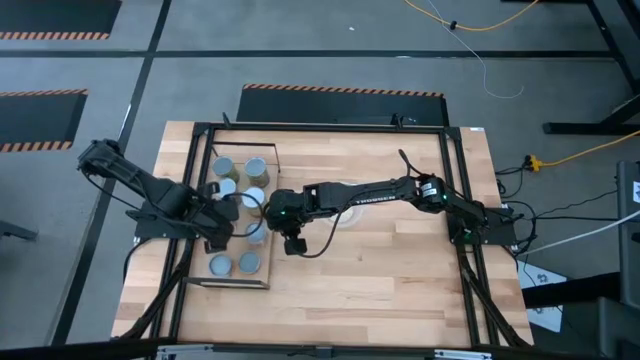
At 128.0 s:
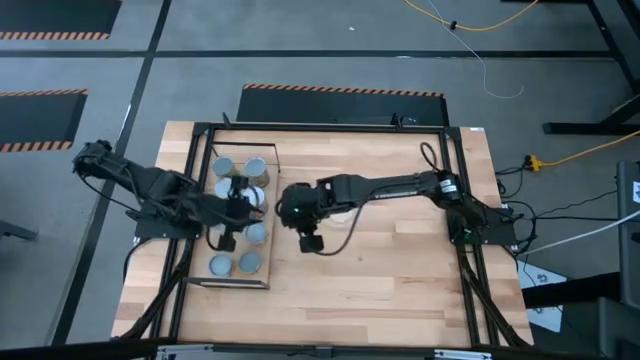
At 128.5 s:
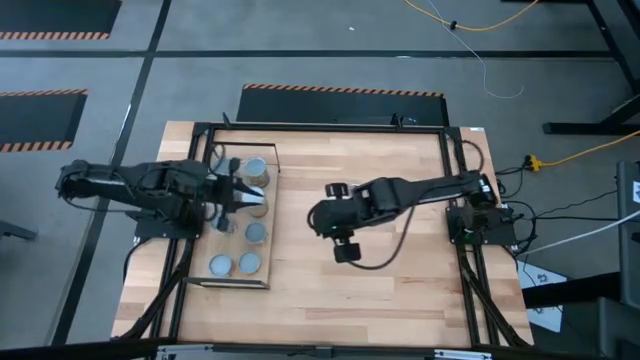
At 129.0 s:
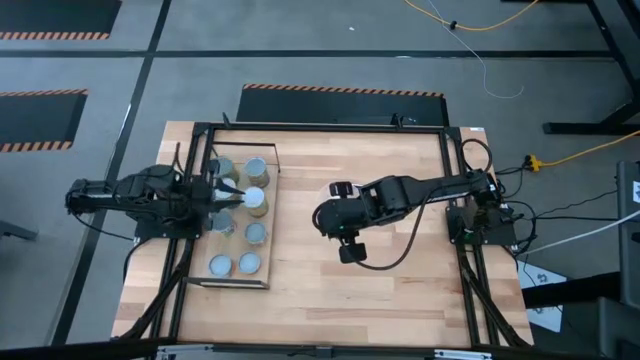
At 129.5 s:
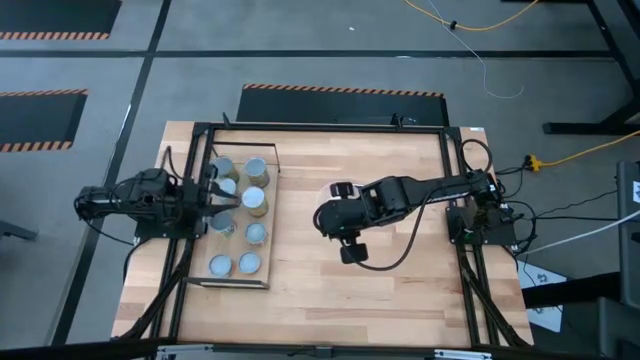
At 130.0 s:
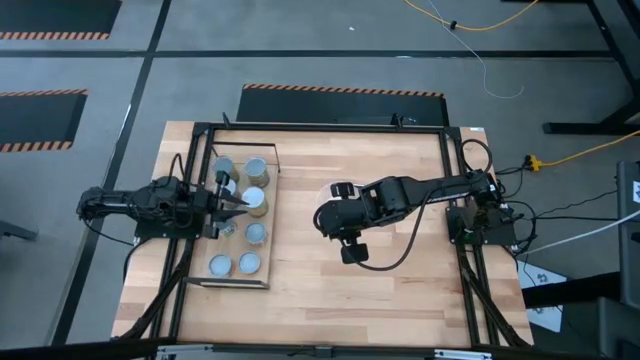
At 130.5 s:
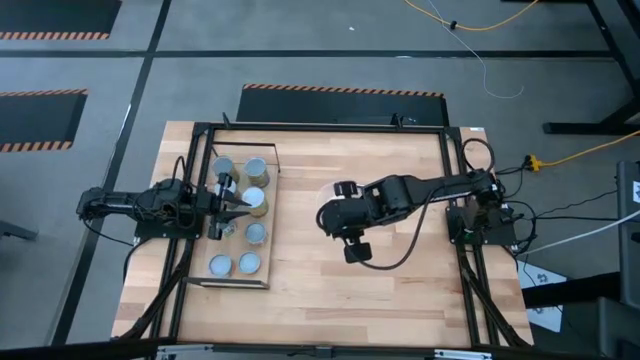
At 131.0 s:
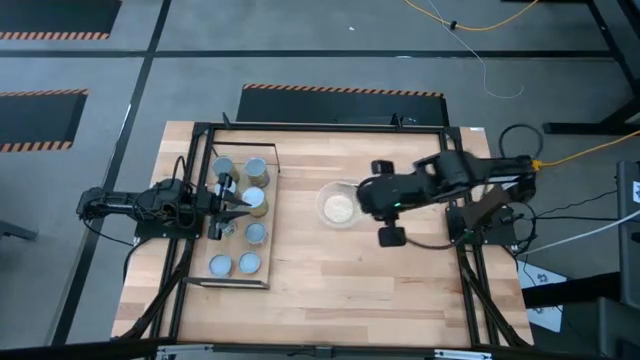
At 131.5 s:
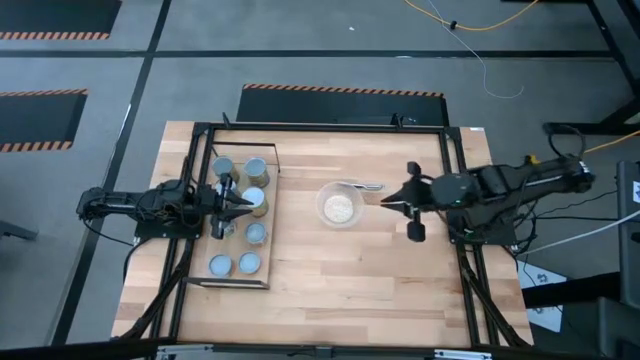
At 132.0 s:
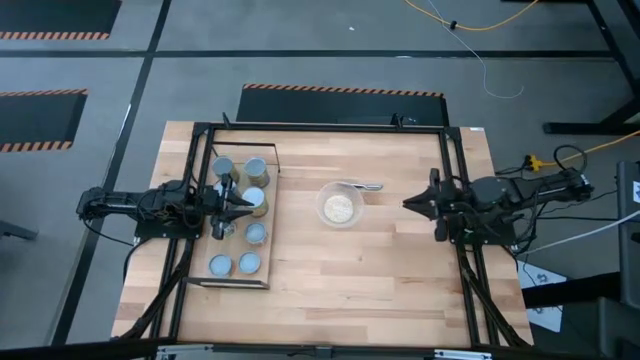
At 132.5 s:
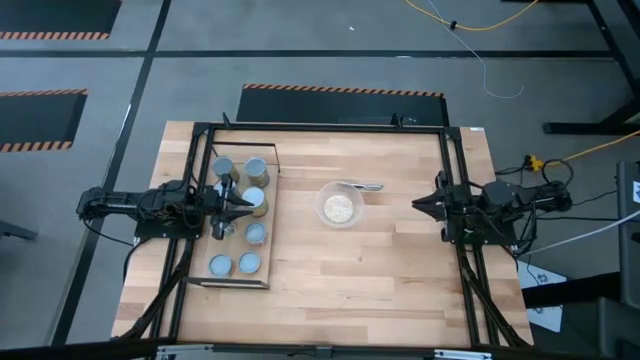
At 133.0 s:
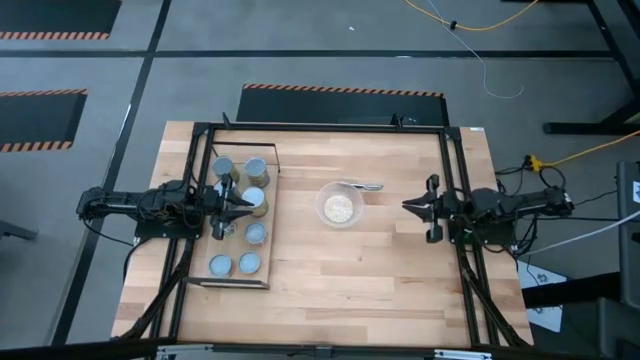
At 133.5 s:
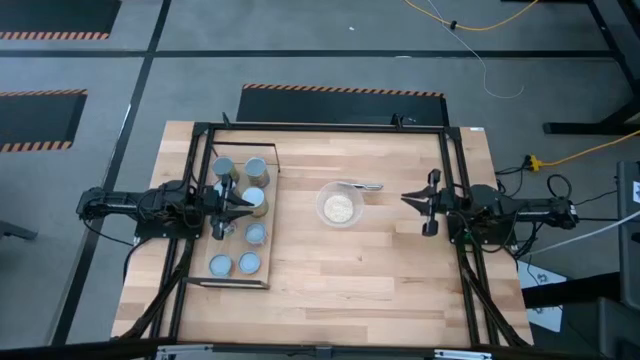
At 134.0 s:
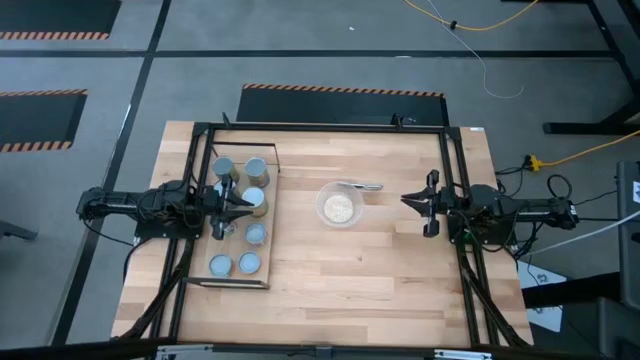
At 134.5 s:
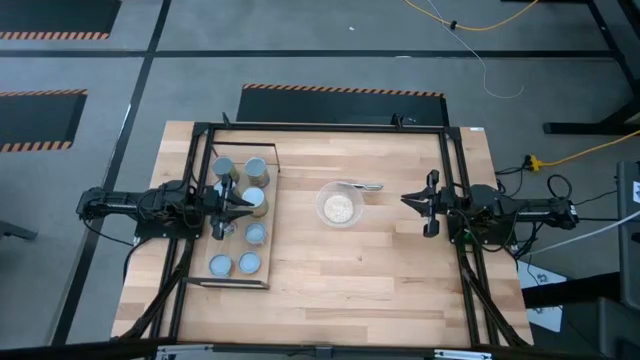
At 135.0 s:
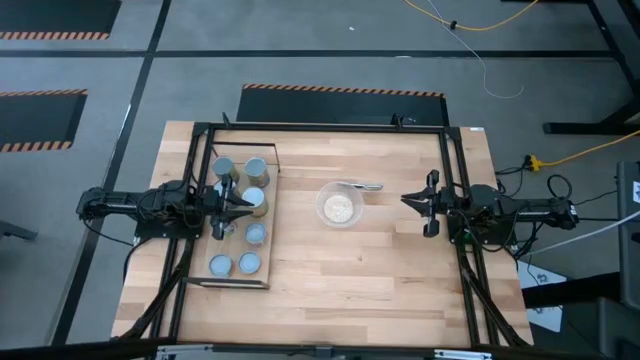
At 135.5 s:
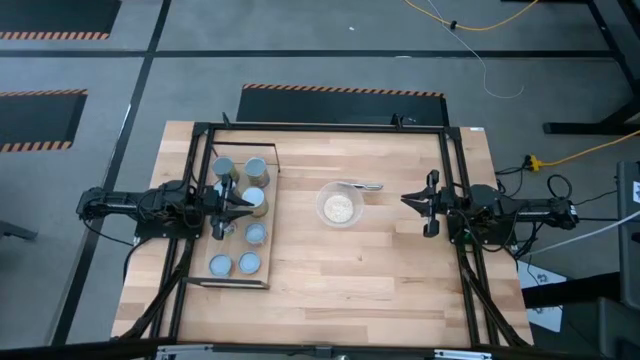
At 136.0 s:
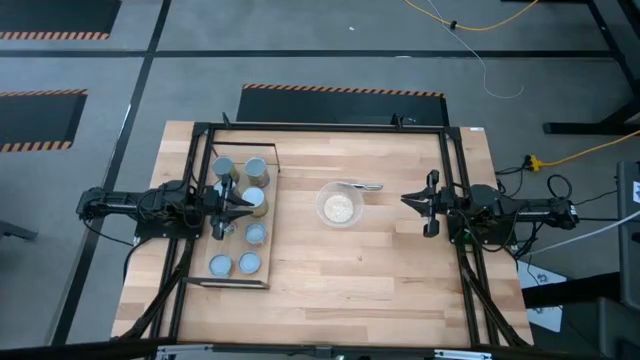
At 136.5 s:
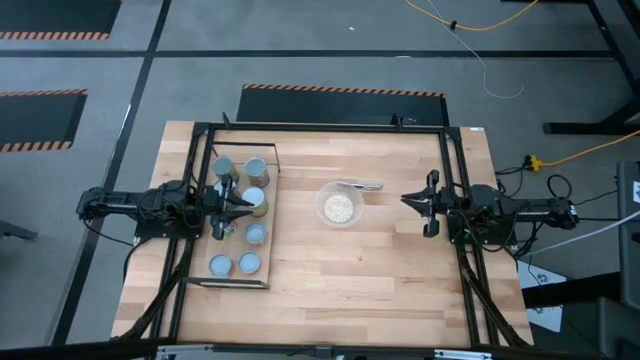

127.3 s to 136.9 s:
Task: Pick and place cans onto a shelf
Return to Home Position

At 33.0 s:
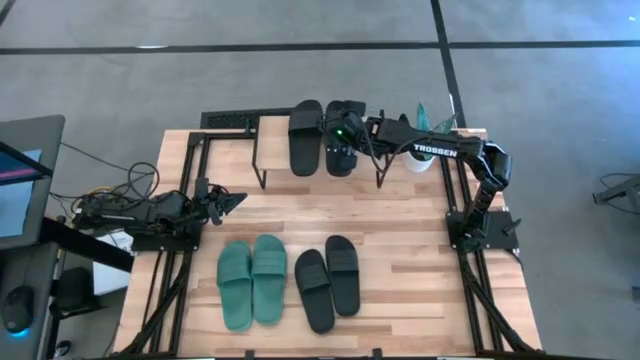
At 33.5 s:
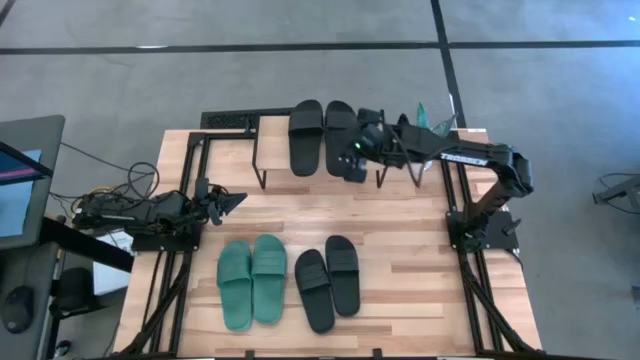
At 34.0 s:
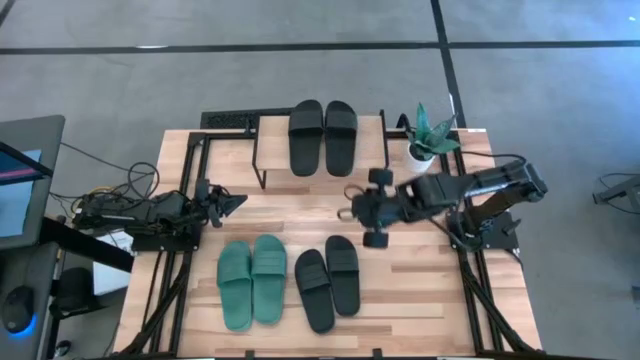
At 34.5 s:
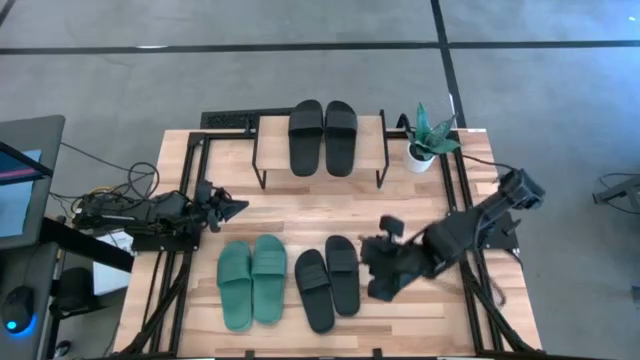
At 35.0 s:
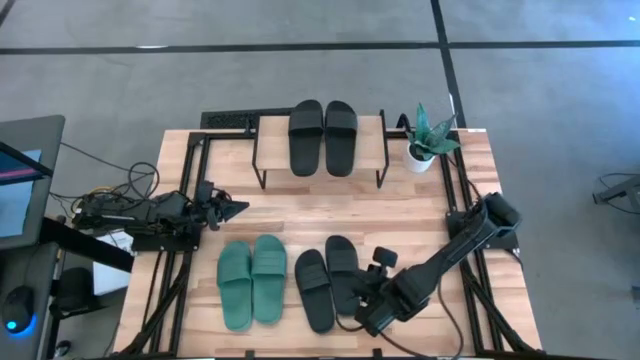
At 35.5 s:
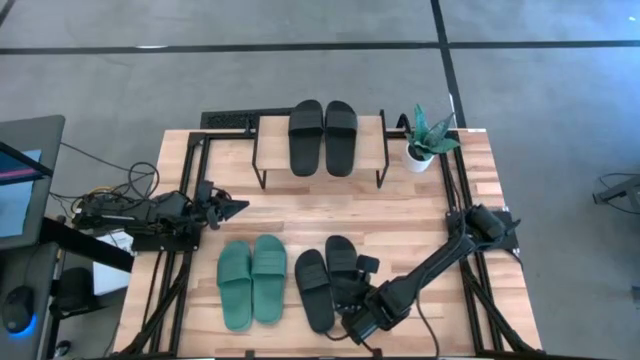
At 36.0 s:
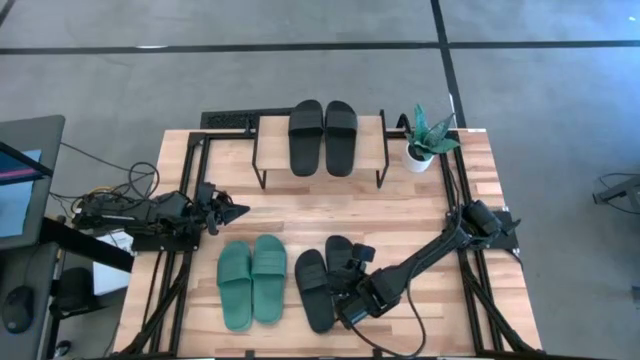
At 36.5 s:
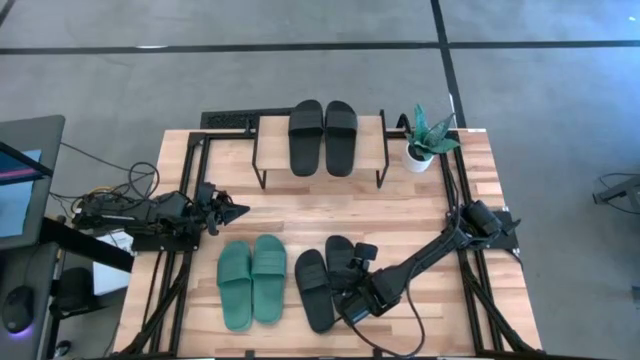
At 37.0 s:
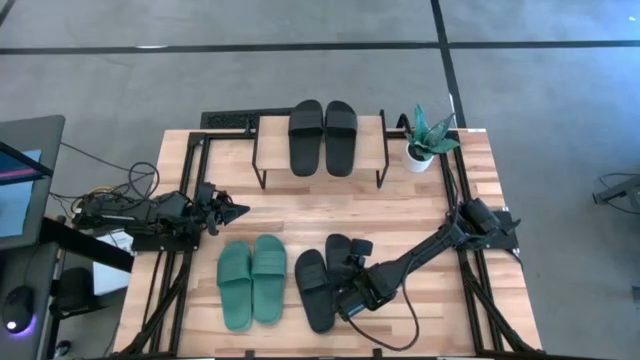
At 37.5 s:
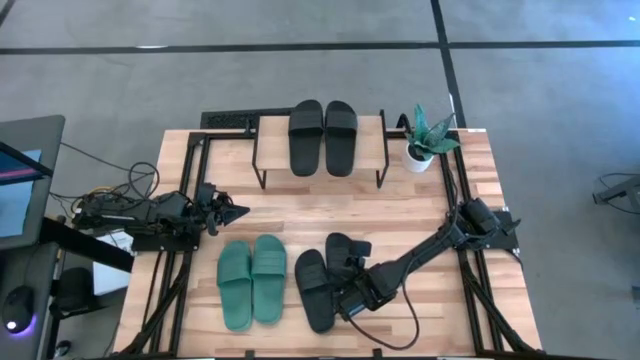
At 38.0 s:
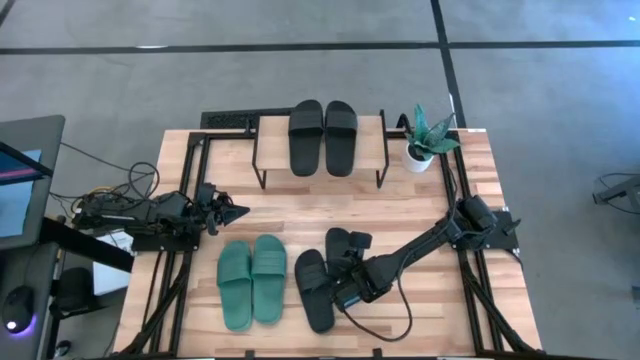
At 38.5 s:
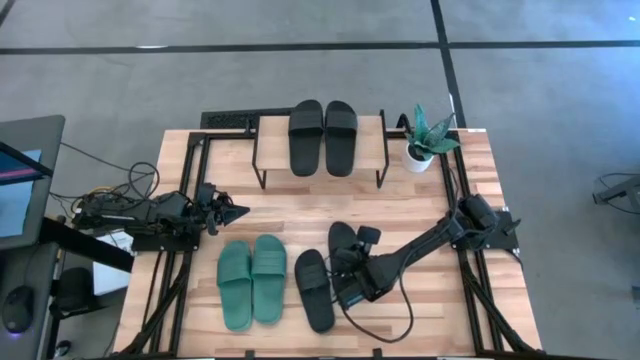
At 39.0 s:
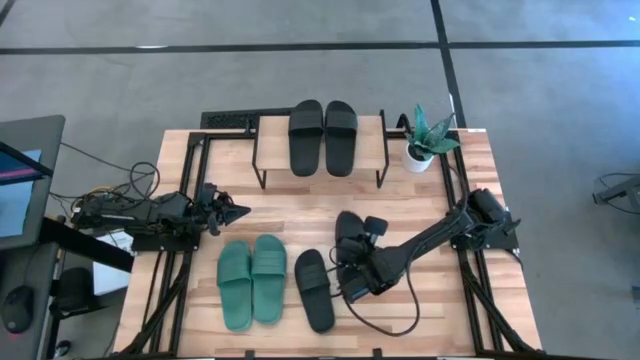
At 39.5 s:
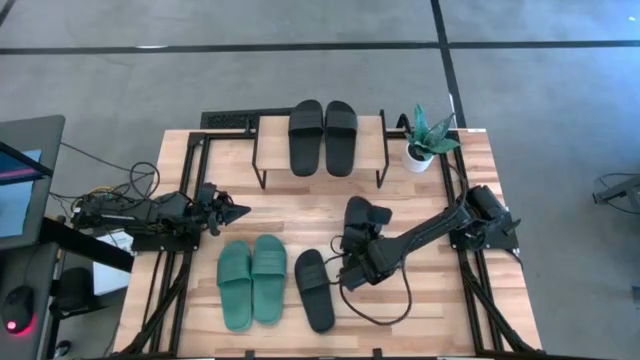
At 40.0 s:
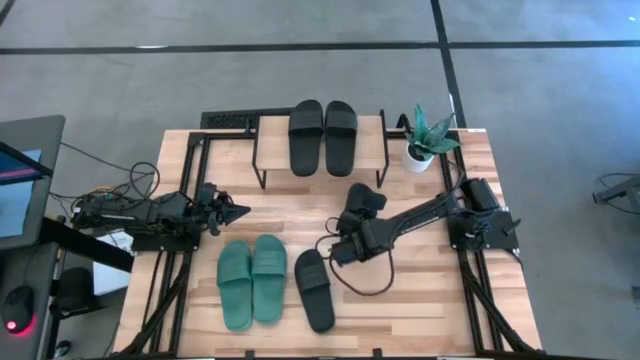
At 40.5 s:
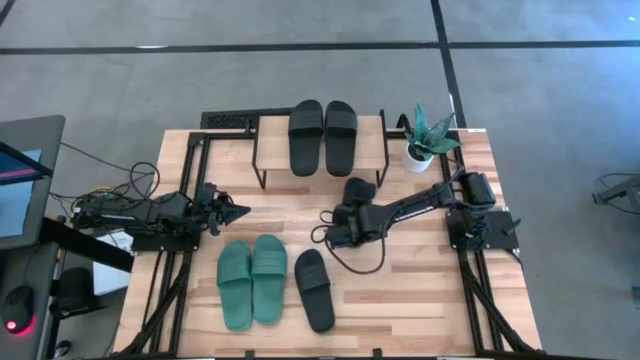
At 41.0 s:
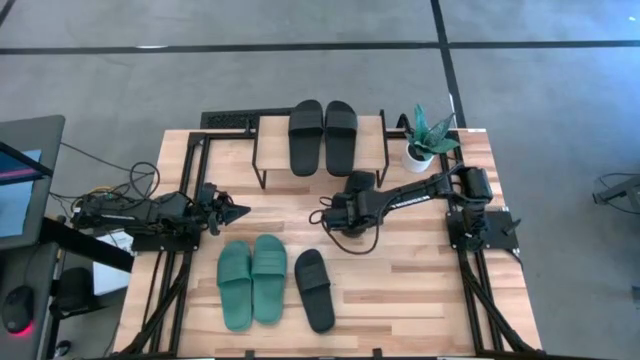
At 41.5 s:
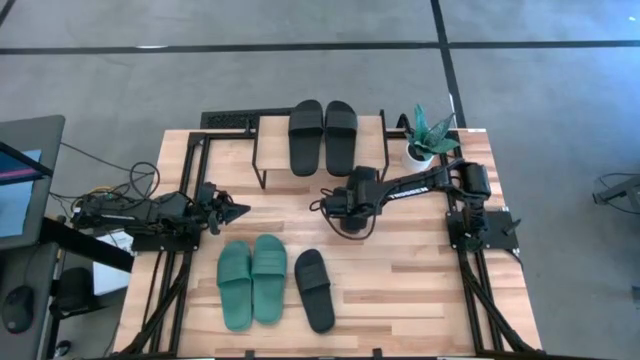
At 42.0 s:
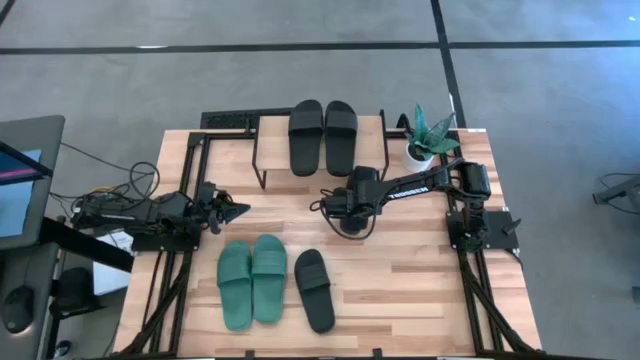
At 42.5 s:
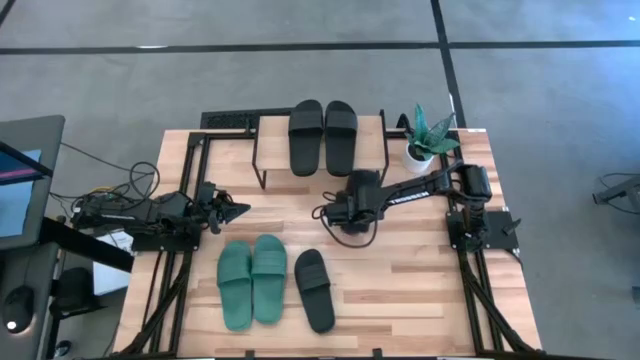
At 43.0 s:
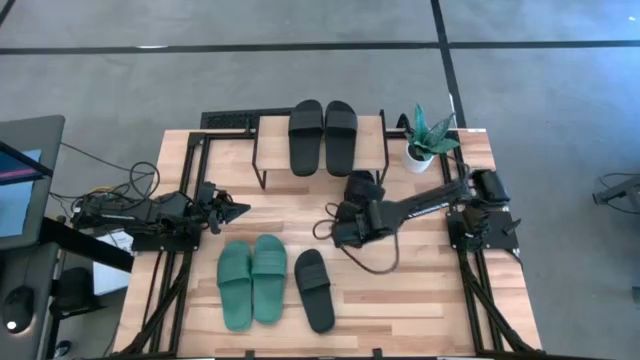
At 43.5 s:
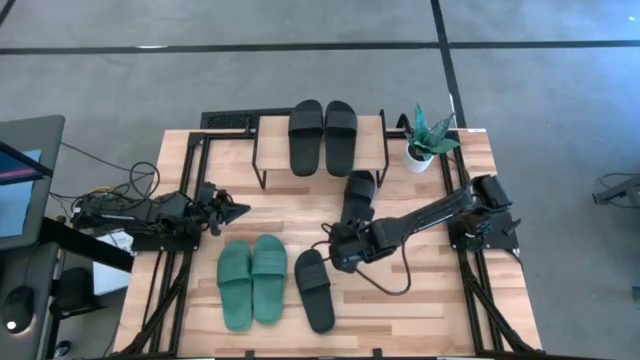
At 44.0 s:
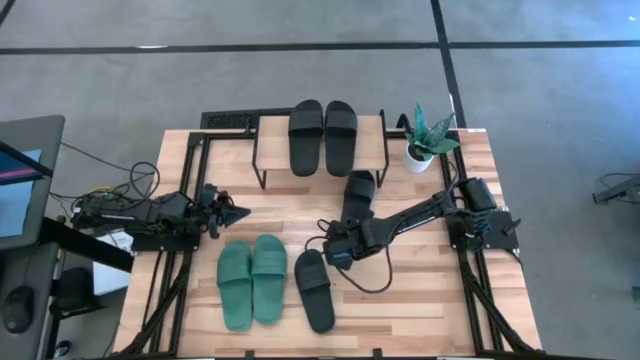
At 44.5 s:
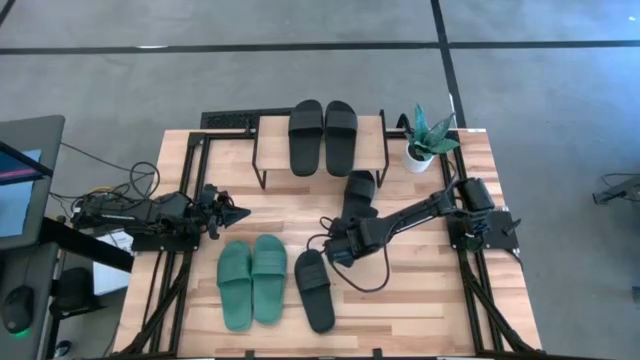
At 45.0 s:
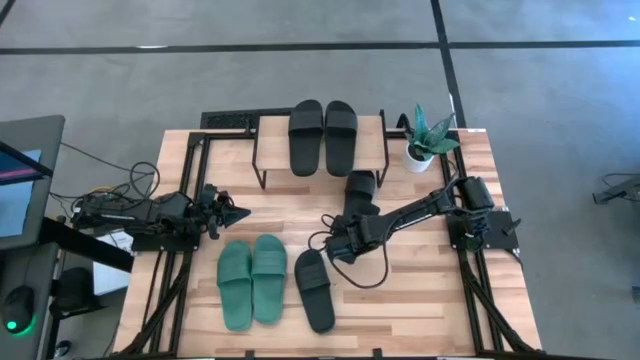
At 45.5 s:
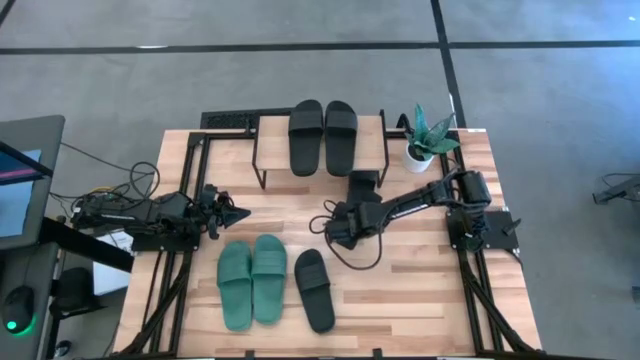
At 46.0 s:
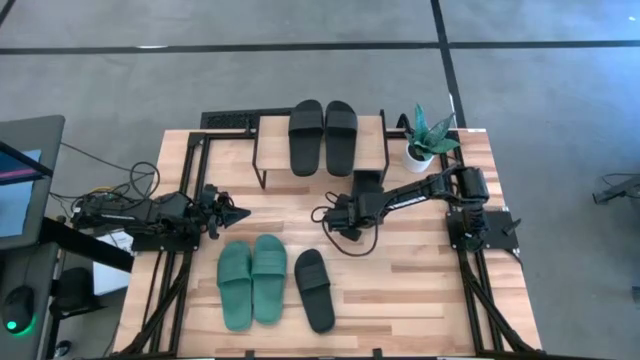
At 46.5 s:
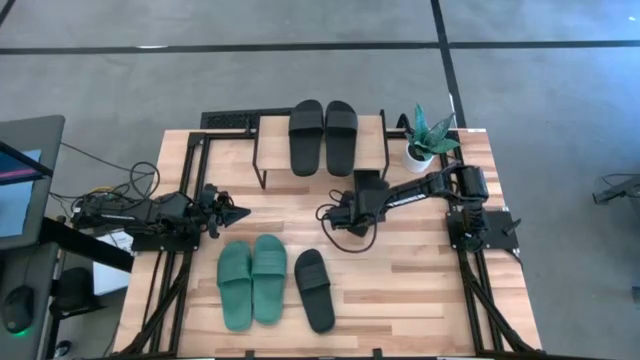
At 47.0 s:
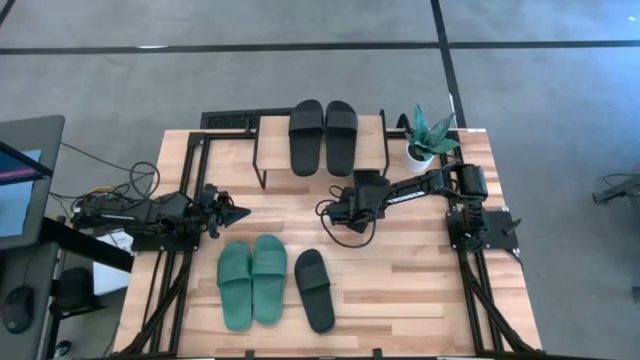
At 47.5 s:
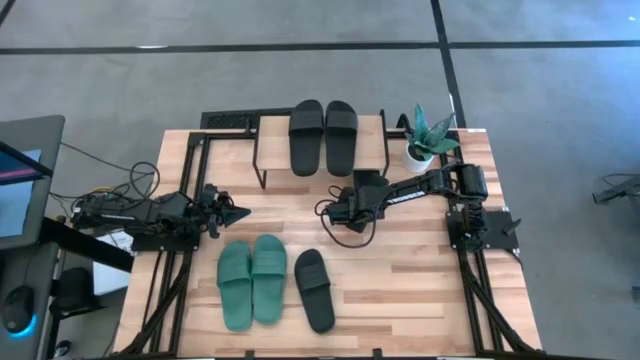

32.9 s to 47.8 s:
Task: Pick and place slides into the shelf
Put the black slide under the shelf
